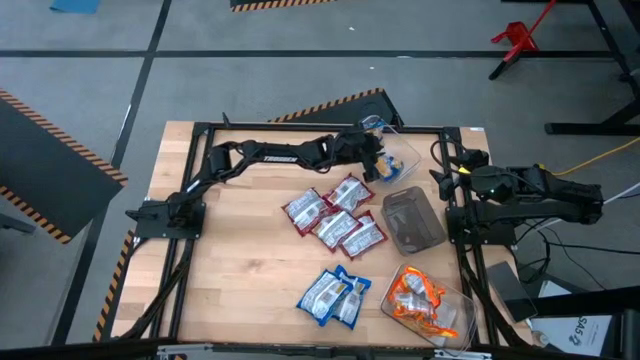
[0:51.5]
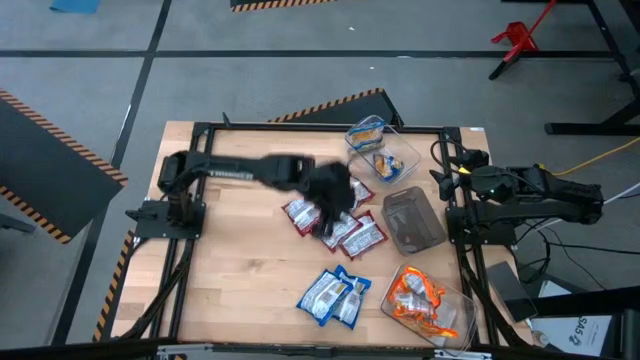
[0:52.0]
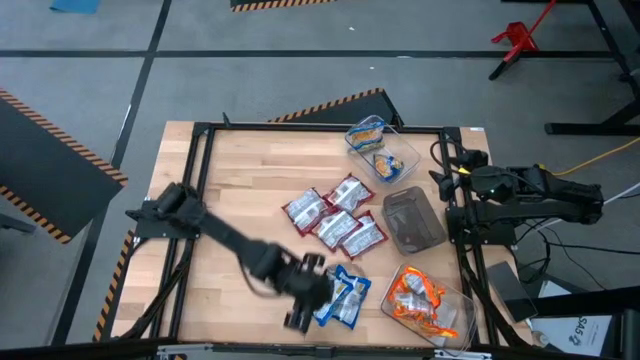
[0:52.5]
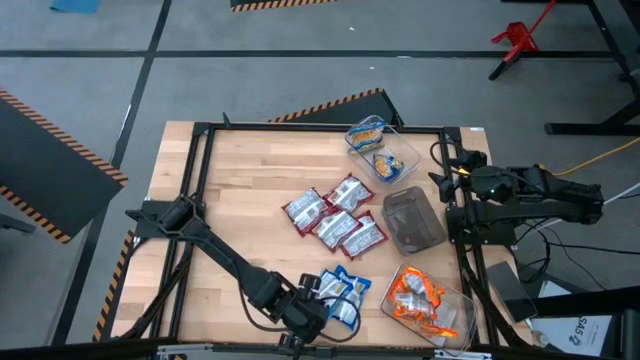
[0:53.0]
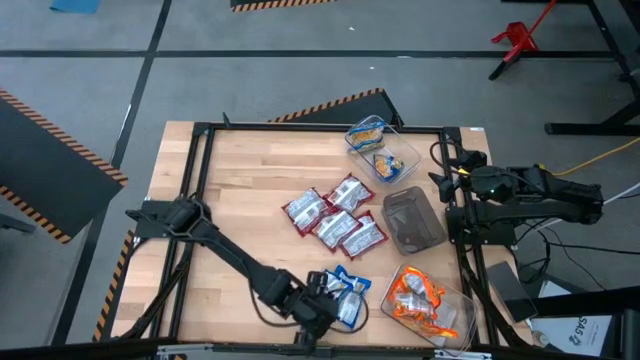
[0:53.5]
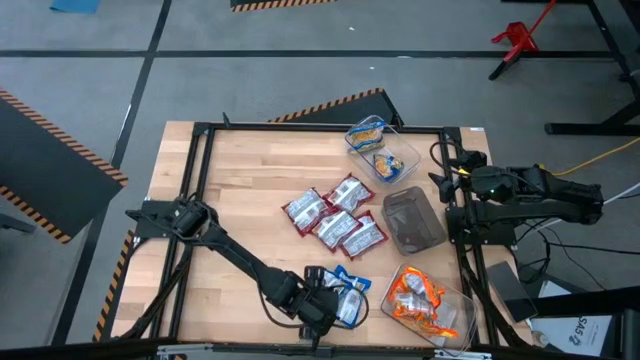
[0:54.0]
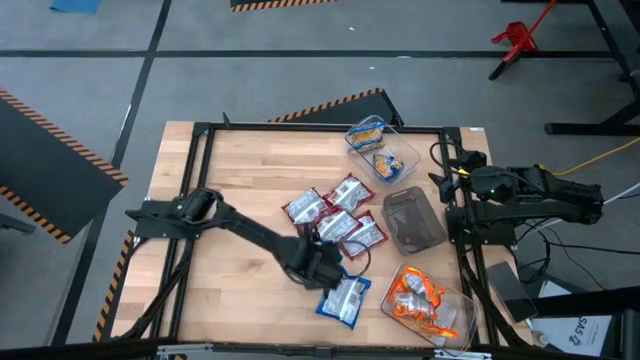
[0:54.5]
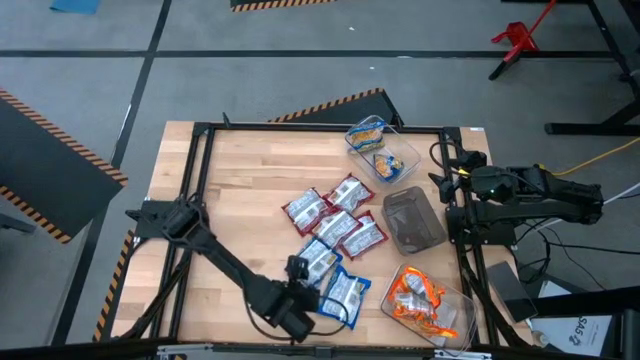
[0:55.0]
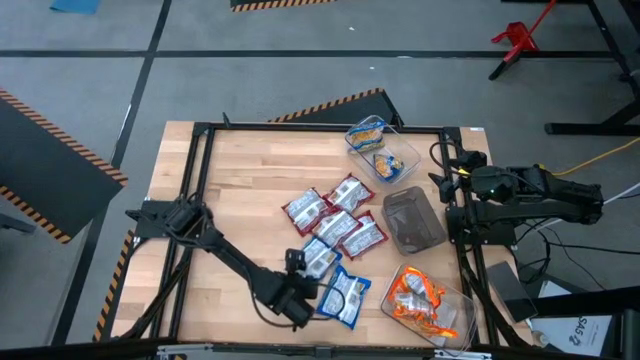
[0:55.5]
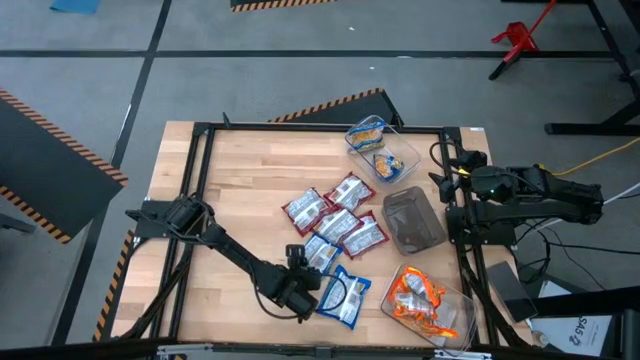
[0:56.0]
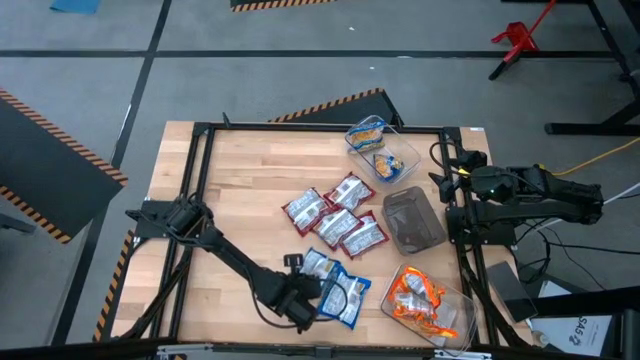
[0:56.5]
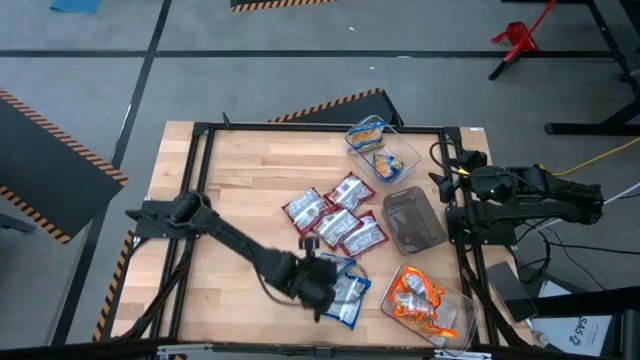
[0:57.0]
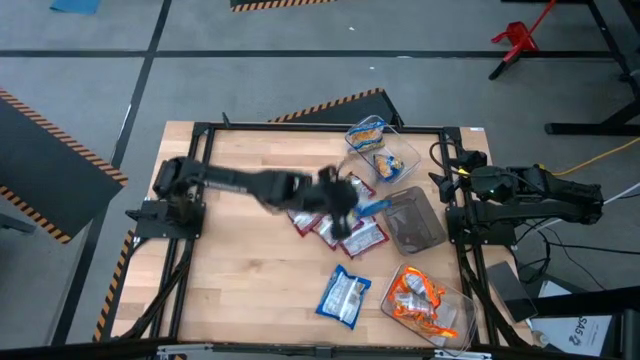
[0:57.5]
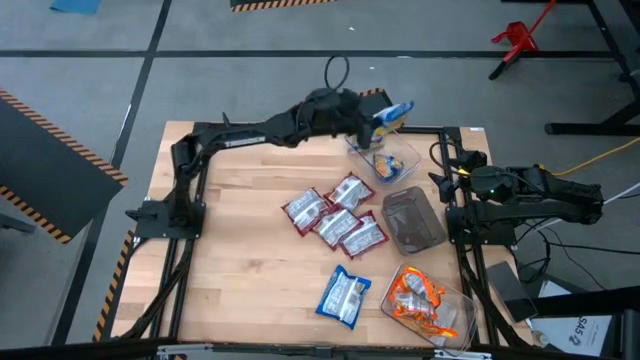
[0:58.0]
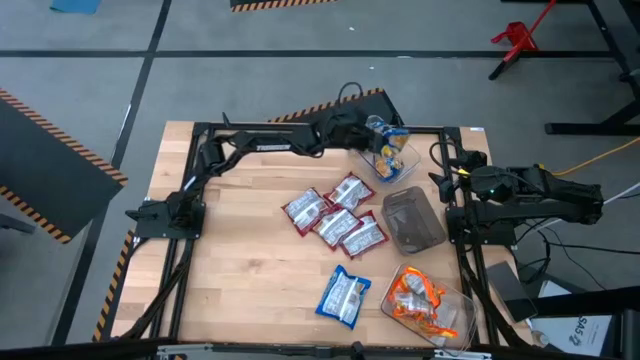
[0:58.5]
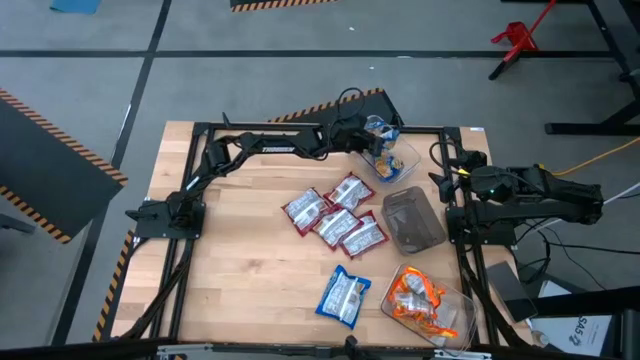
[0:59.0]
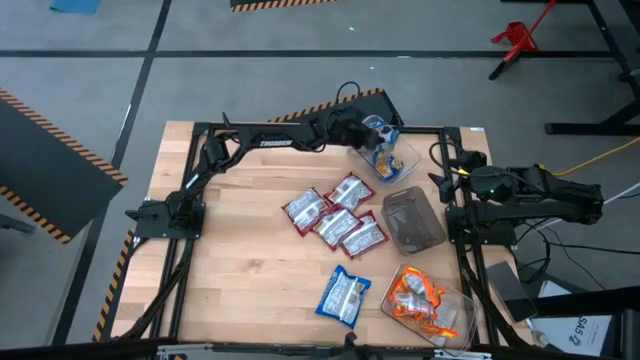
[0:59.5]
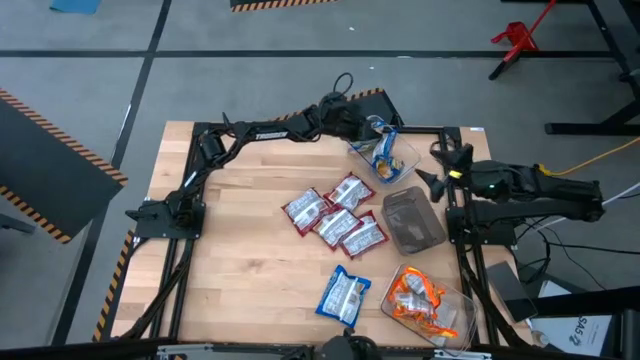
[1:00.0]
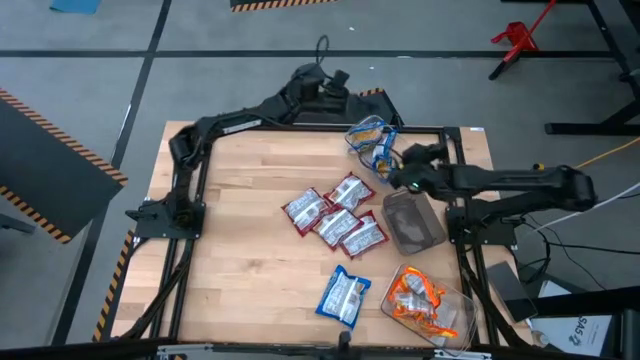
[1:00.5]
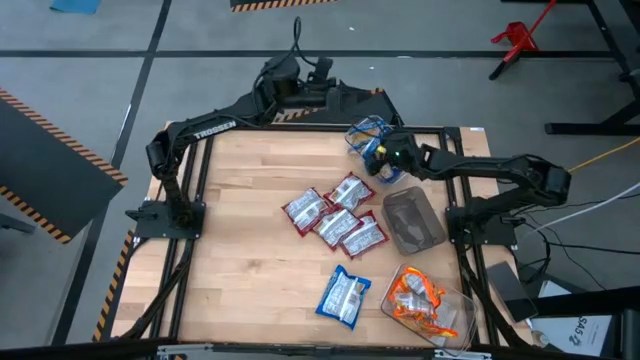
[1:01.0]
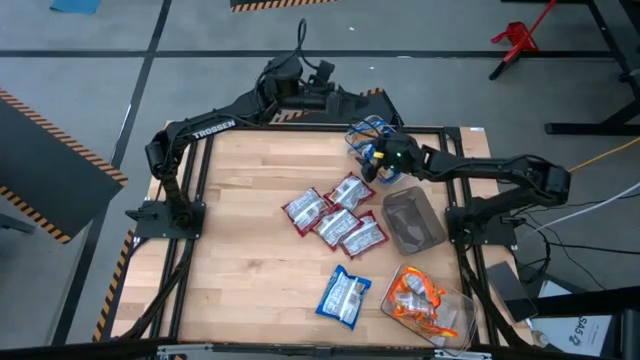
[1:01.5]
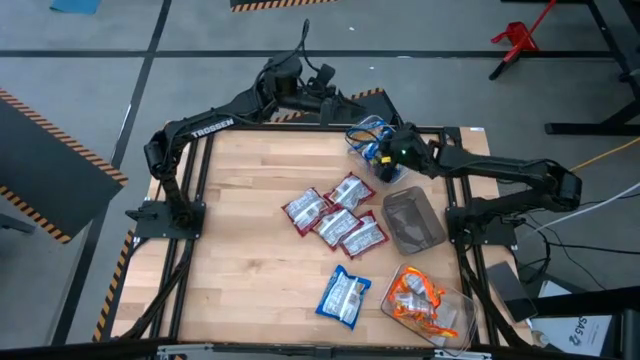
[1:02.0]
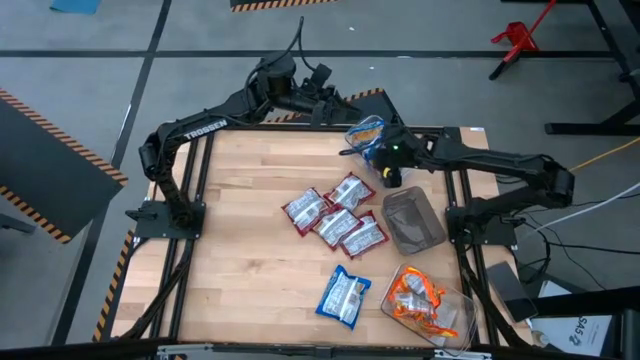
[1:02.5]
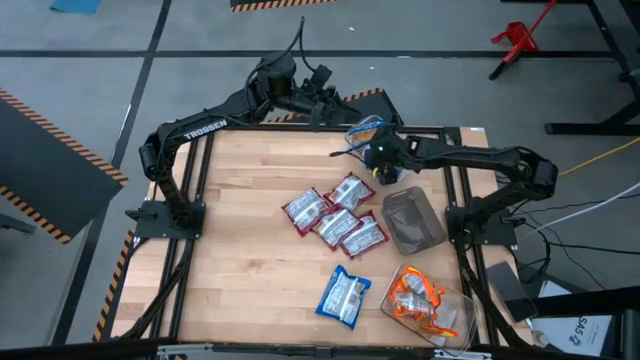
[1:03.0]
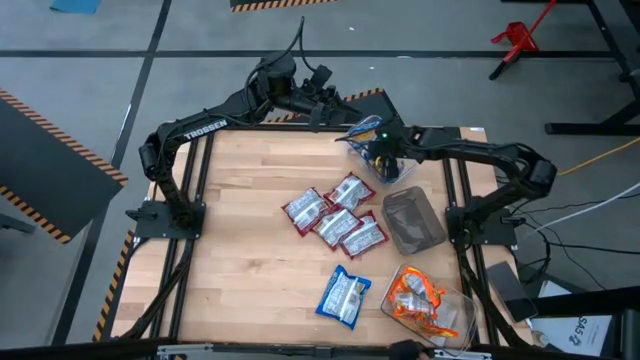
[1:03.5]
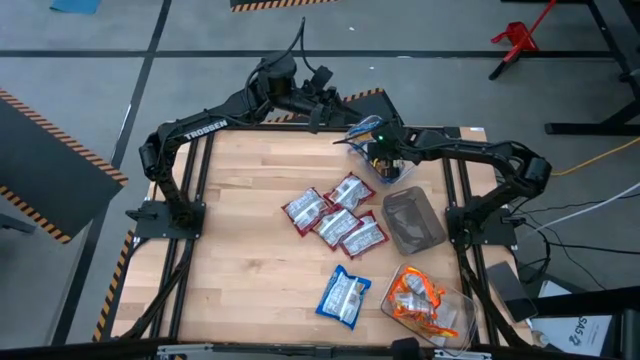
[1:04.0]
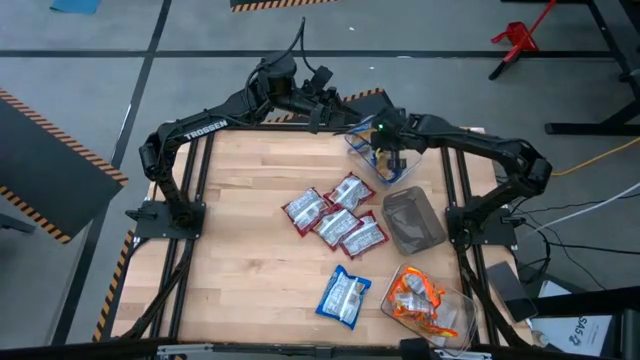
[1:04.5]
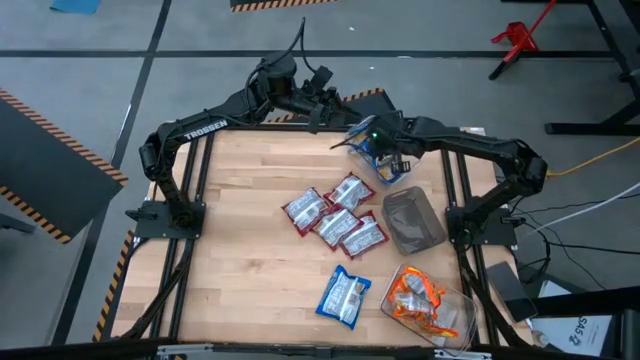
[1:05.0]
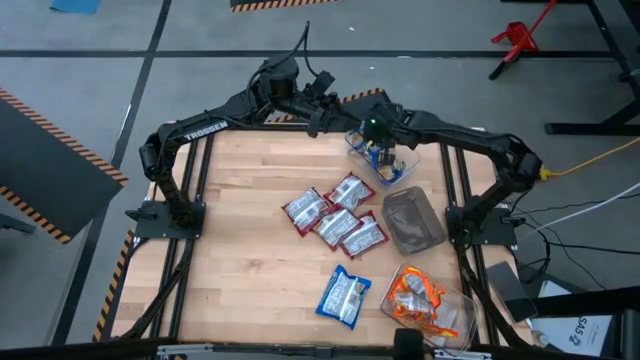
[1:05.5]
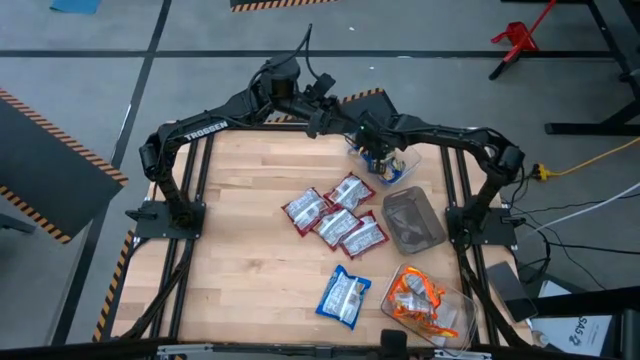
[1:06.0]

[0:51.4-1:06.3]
Task: Sort Maruchan noodles
Put the blue bag into the top transparent bin

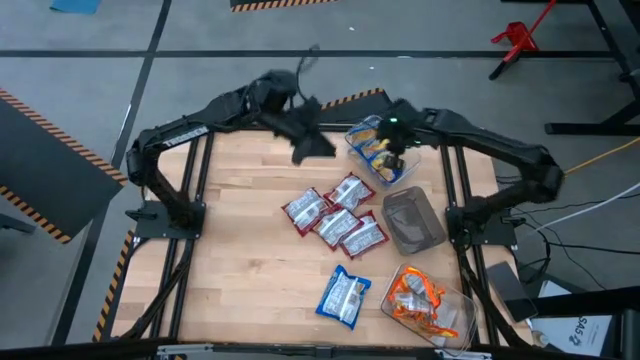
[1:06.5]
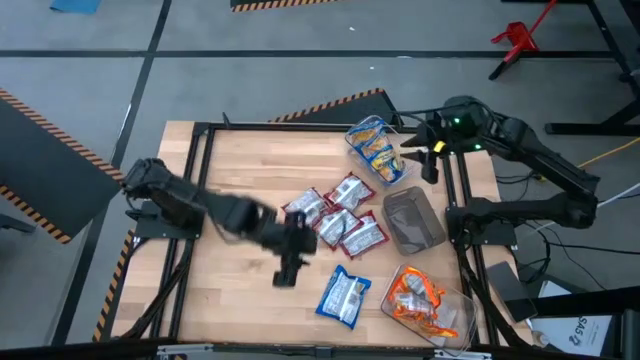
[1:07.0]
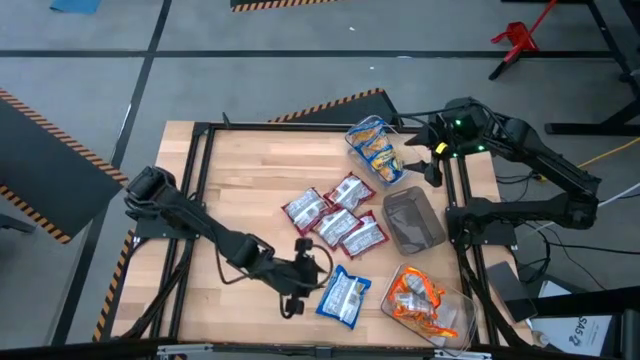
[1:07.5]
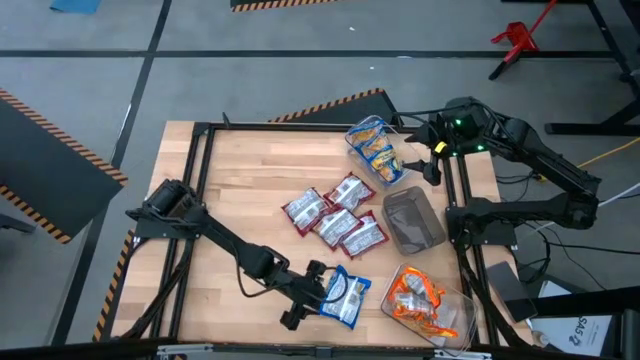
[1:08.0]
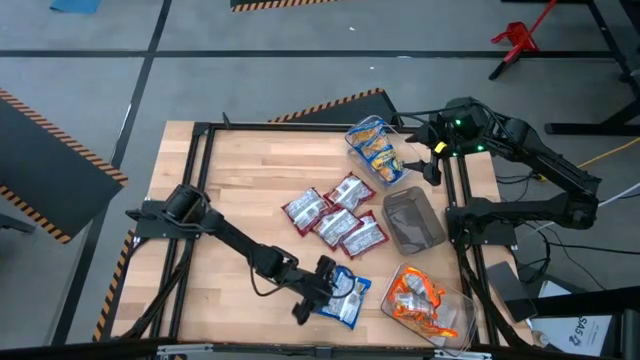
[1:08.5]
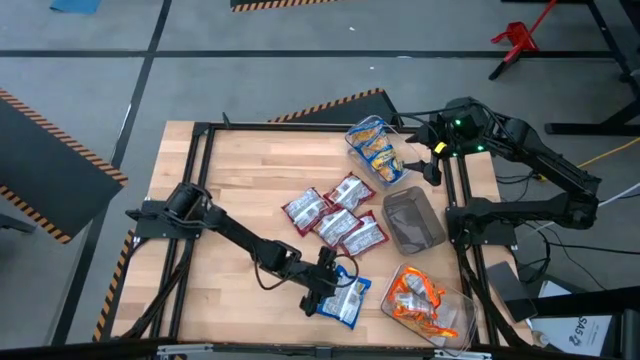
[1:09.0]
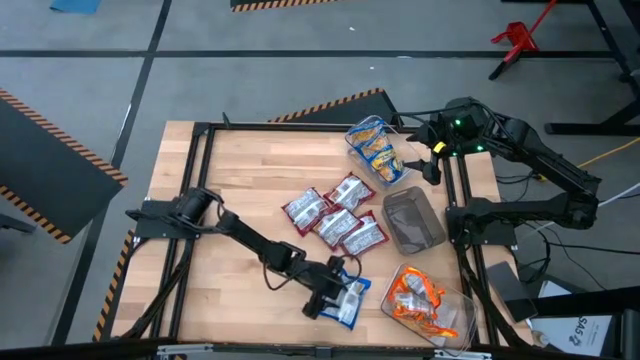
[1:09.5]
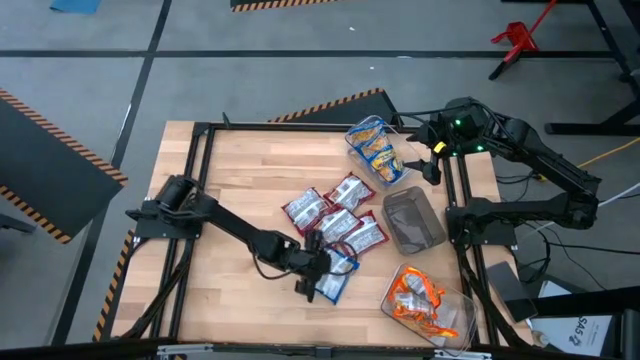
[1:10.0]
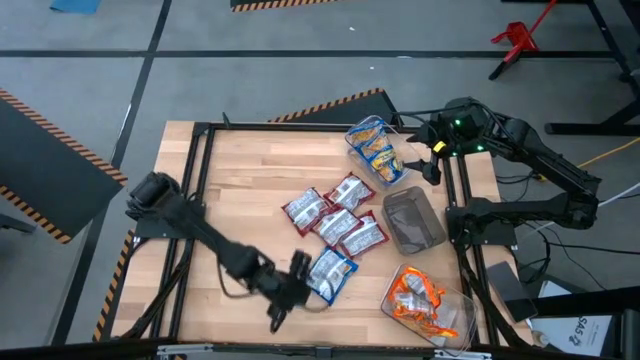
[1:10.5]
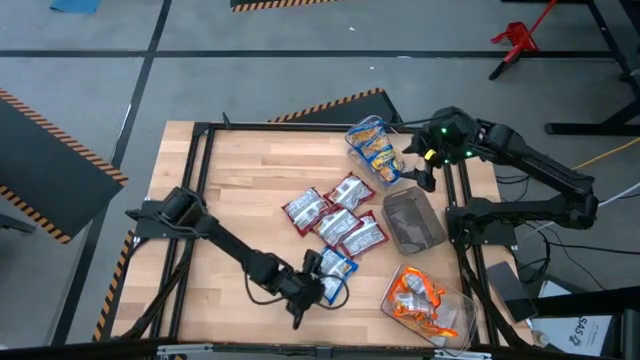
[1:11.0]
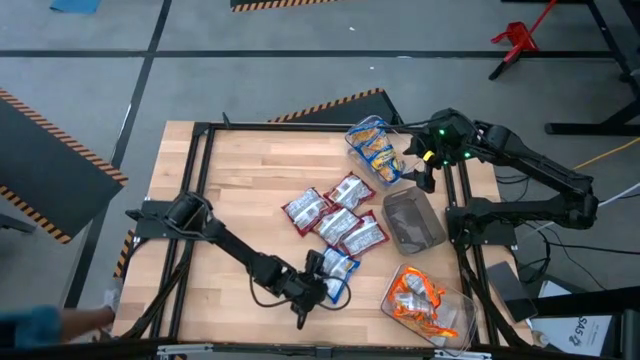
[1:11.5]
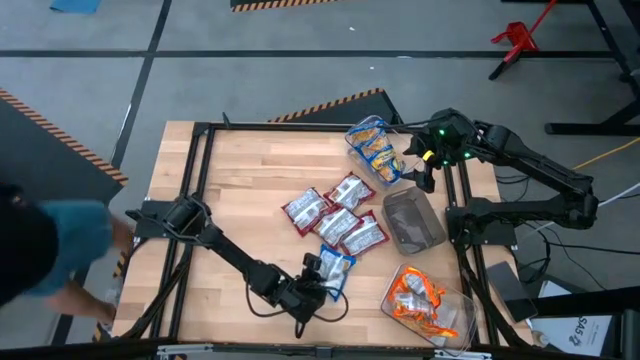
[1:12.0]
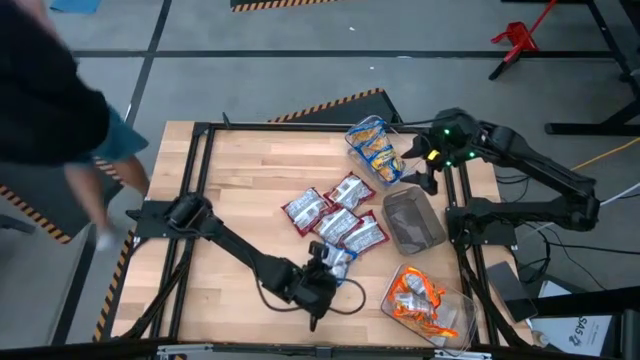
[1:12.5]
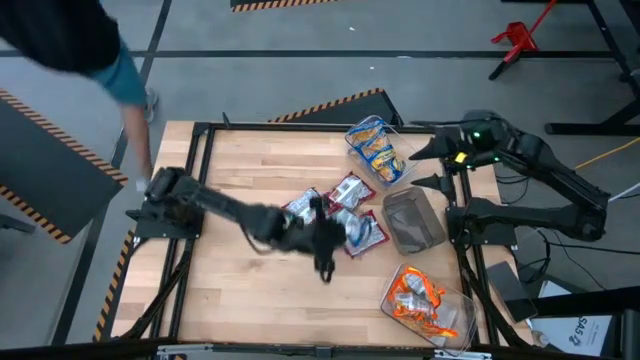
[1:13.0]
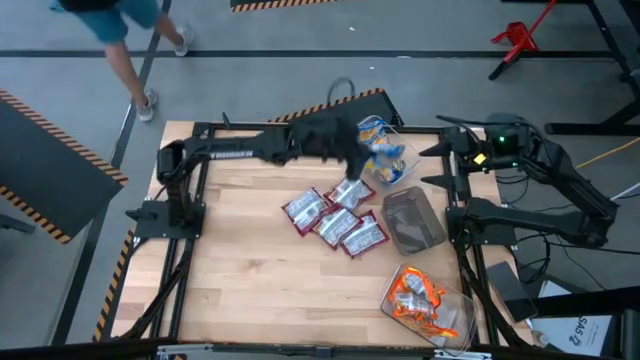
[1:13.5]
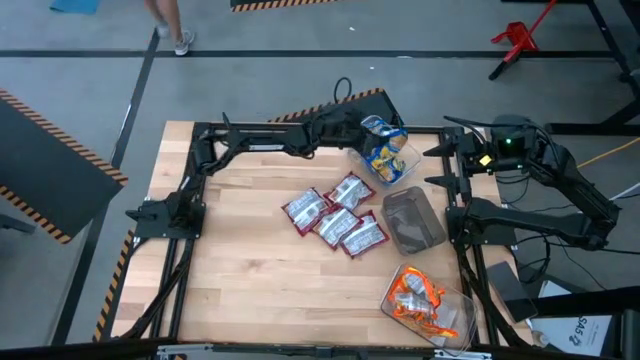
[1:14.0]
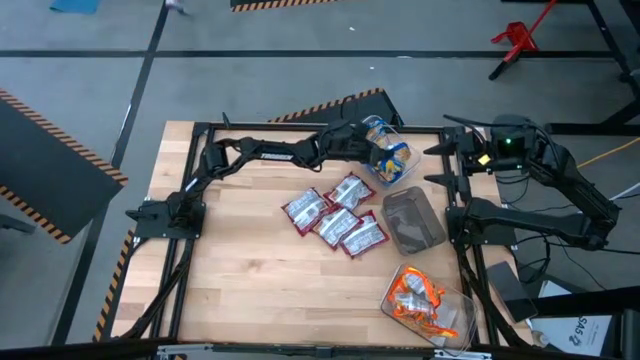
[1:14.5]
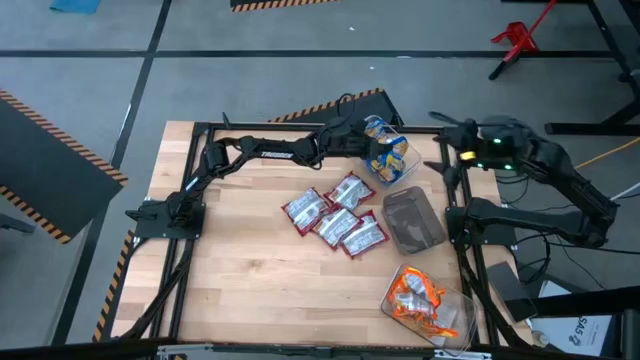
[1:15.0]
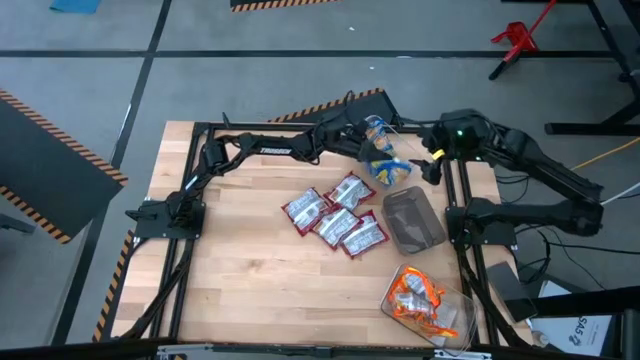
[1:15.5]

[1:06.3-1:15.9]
Put the blue bag into the top transparent bin
